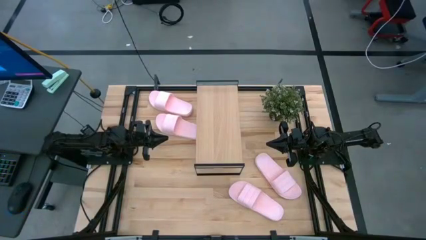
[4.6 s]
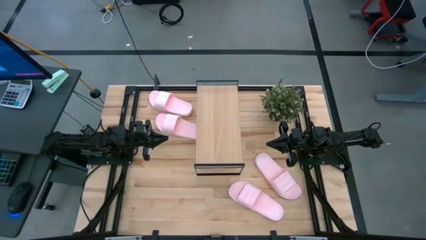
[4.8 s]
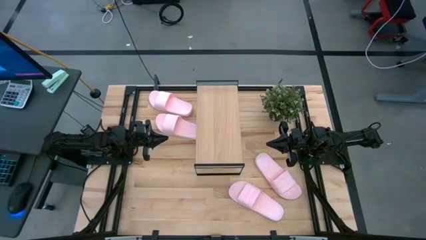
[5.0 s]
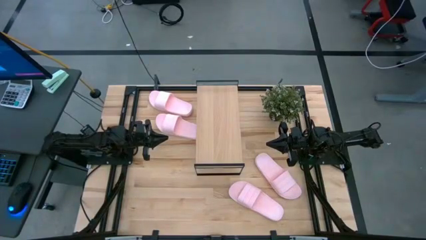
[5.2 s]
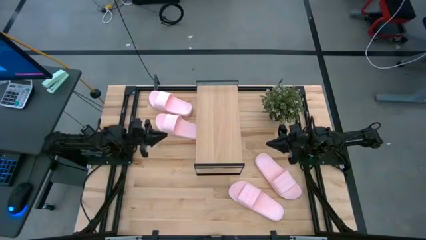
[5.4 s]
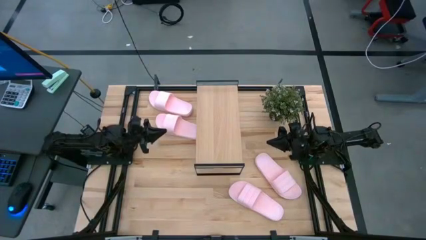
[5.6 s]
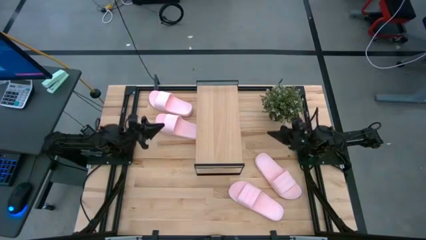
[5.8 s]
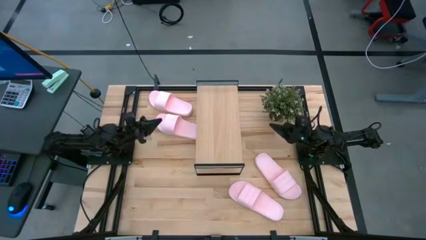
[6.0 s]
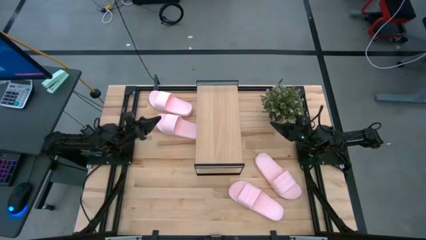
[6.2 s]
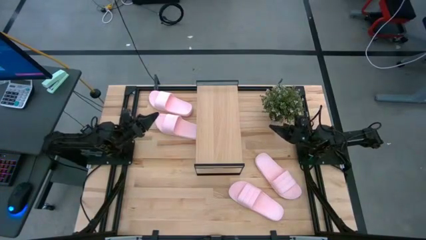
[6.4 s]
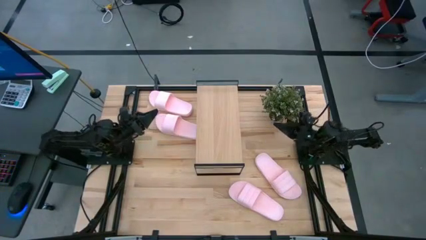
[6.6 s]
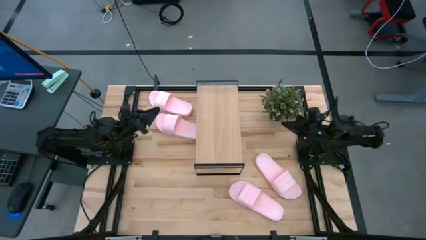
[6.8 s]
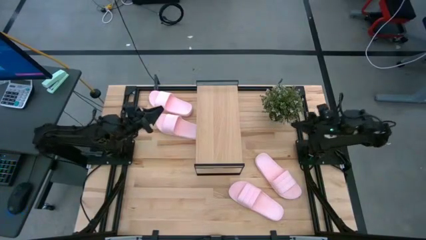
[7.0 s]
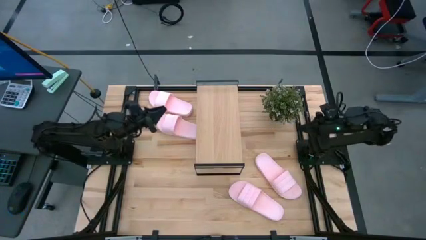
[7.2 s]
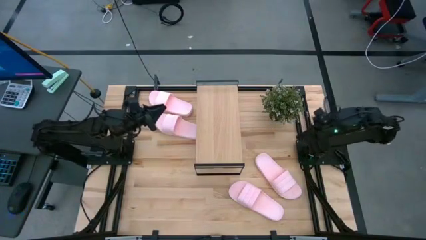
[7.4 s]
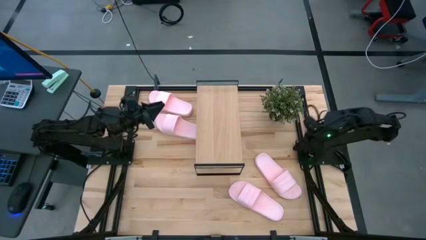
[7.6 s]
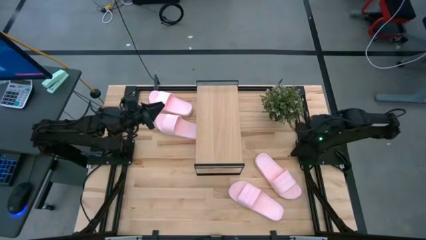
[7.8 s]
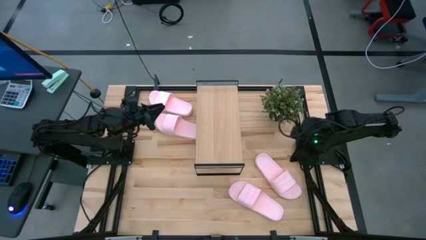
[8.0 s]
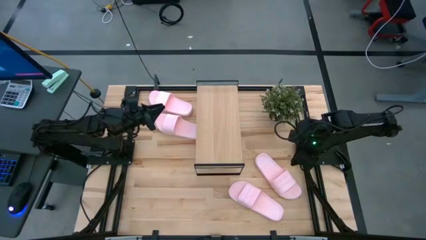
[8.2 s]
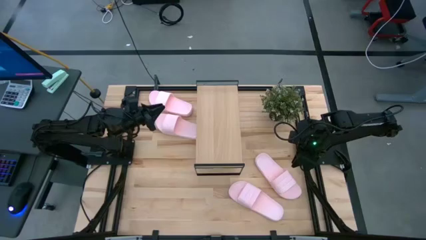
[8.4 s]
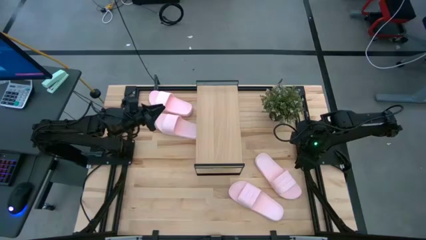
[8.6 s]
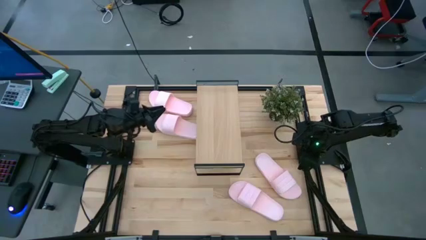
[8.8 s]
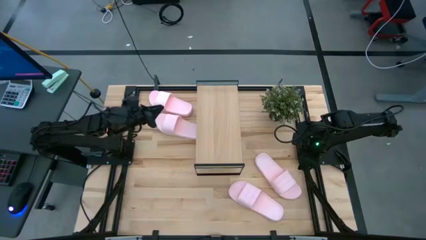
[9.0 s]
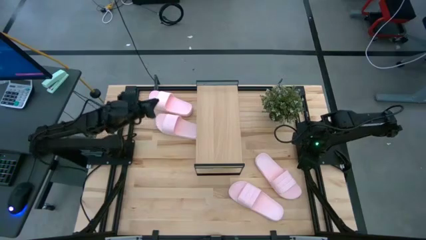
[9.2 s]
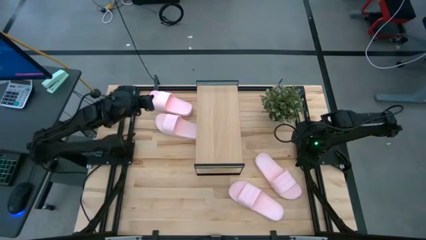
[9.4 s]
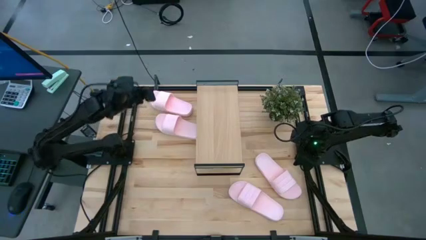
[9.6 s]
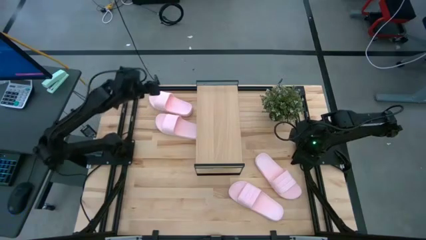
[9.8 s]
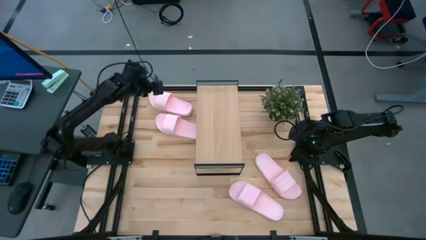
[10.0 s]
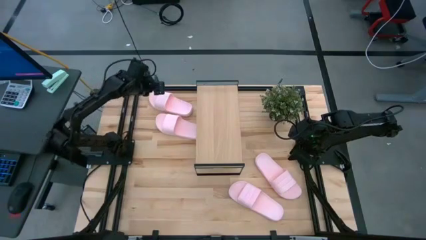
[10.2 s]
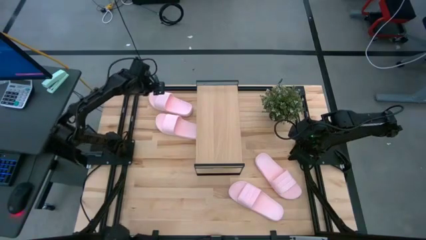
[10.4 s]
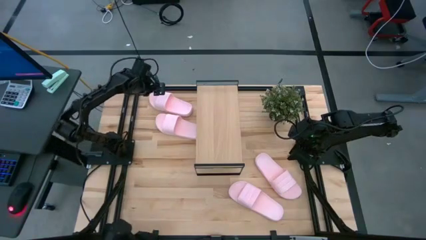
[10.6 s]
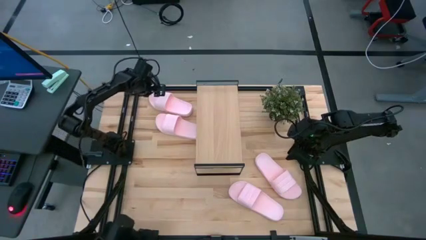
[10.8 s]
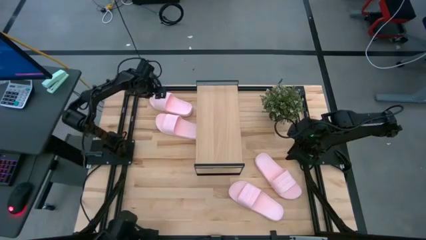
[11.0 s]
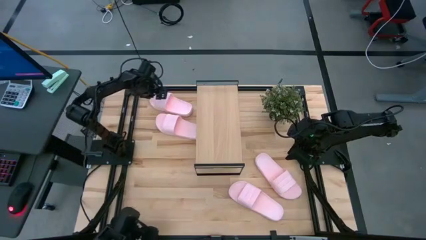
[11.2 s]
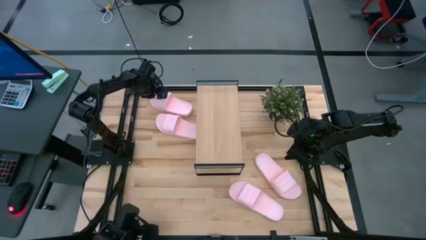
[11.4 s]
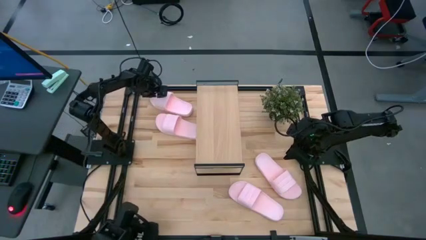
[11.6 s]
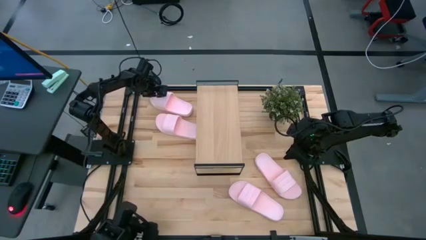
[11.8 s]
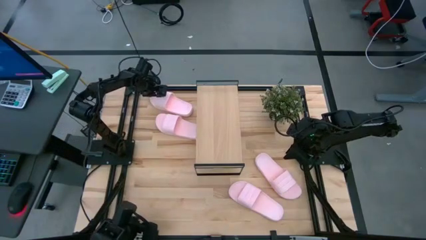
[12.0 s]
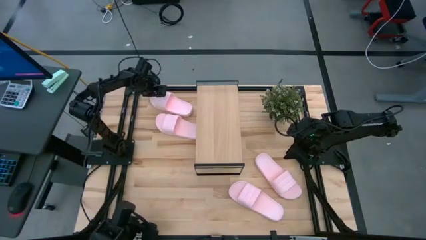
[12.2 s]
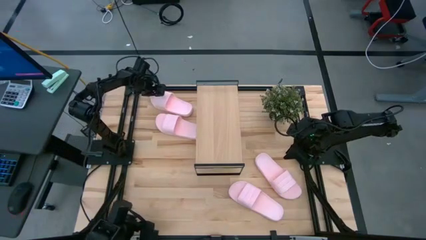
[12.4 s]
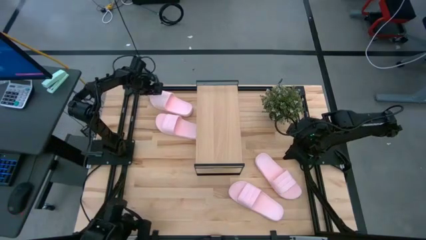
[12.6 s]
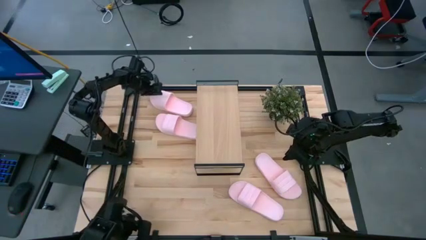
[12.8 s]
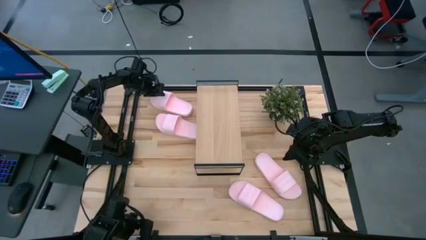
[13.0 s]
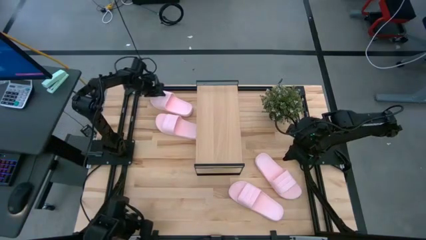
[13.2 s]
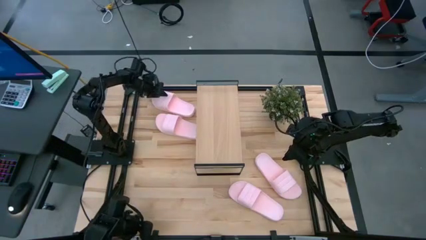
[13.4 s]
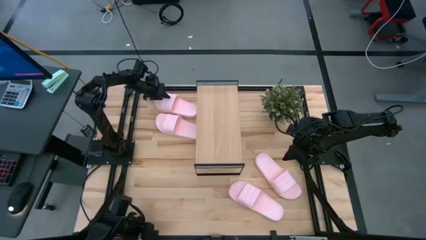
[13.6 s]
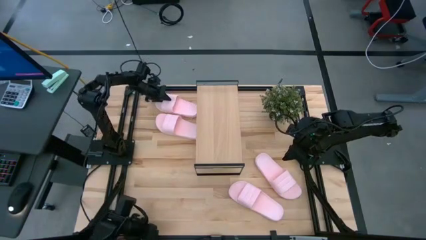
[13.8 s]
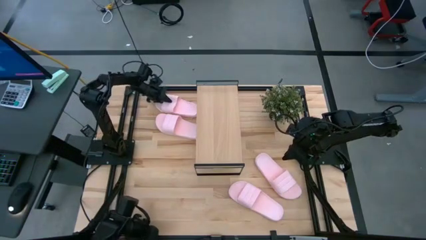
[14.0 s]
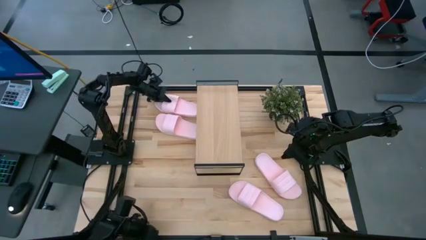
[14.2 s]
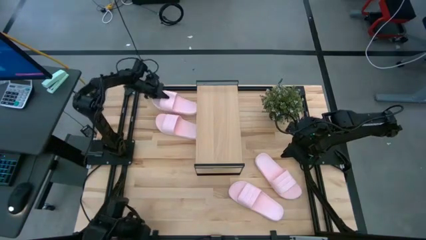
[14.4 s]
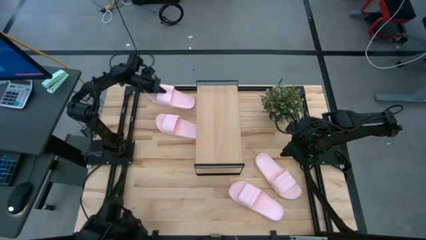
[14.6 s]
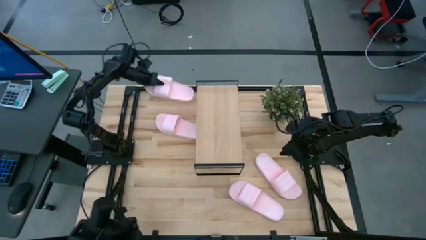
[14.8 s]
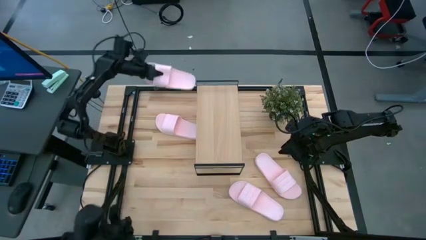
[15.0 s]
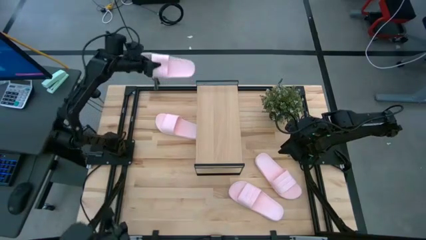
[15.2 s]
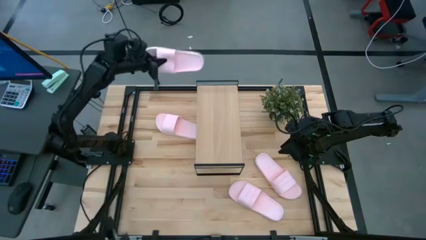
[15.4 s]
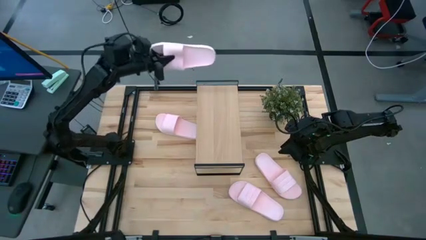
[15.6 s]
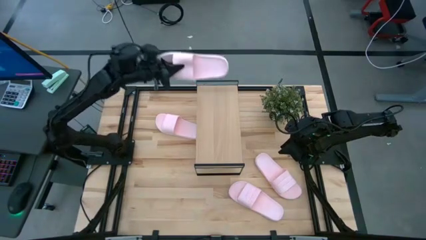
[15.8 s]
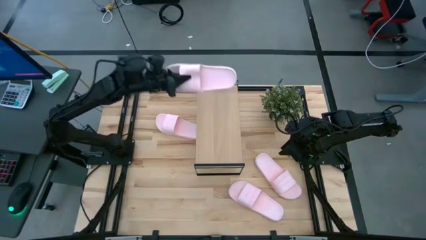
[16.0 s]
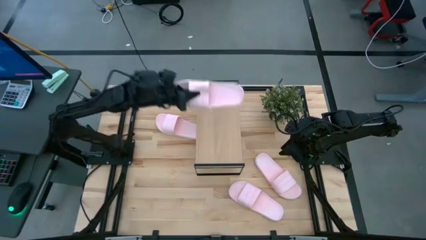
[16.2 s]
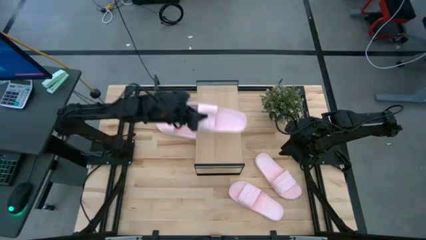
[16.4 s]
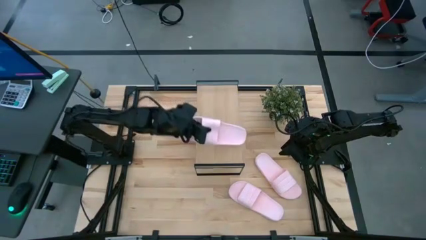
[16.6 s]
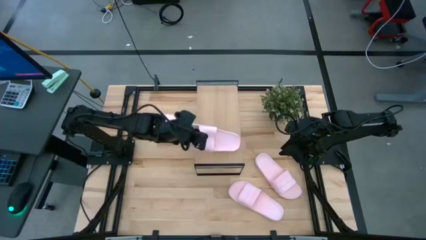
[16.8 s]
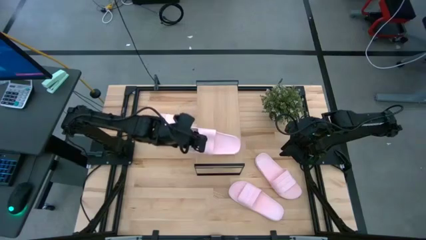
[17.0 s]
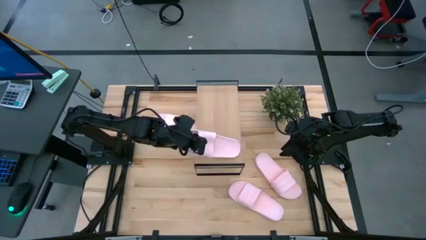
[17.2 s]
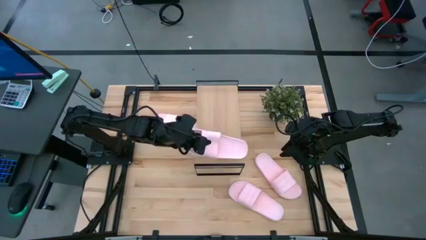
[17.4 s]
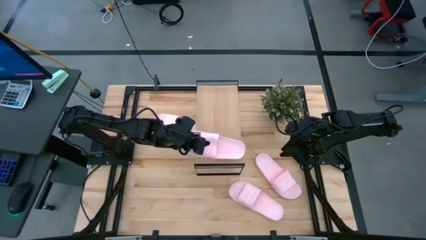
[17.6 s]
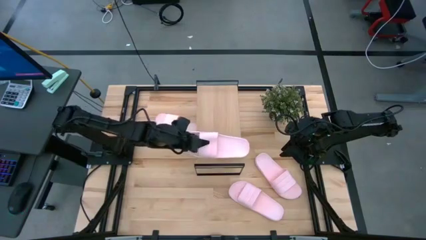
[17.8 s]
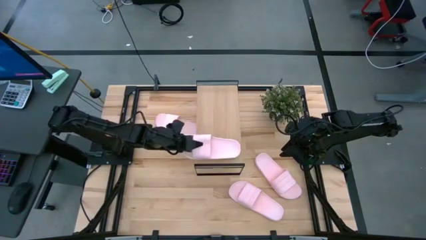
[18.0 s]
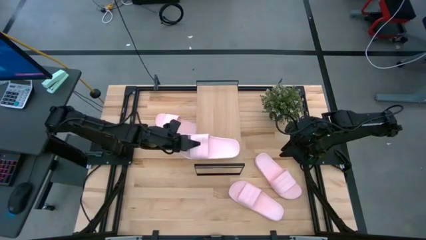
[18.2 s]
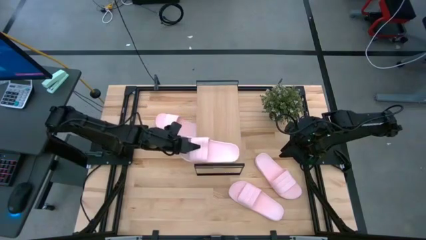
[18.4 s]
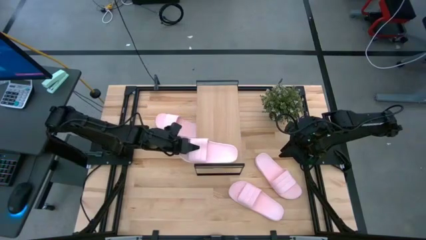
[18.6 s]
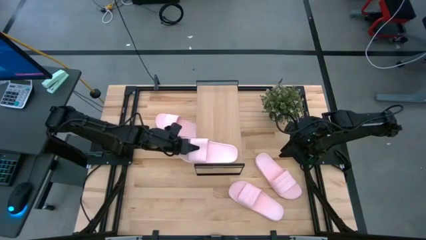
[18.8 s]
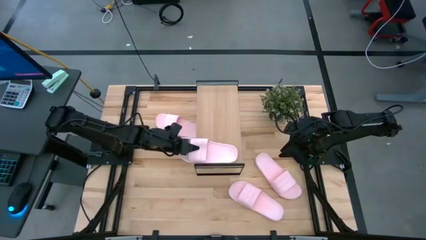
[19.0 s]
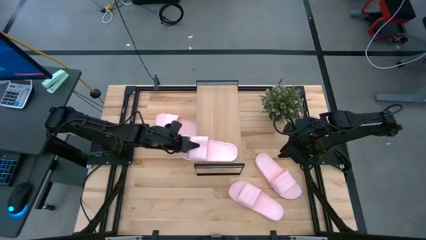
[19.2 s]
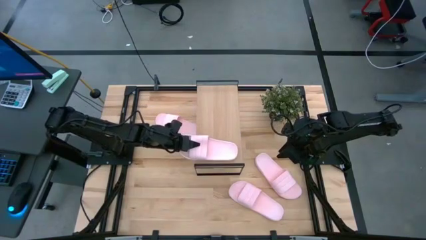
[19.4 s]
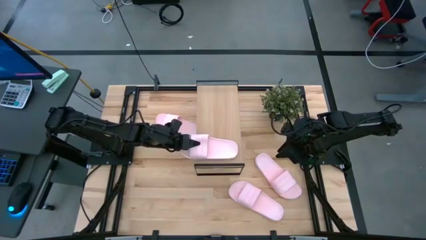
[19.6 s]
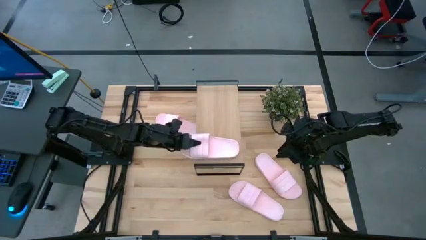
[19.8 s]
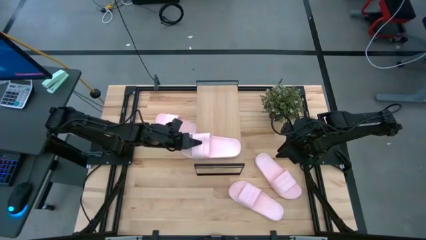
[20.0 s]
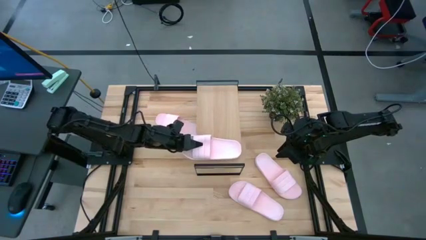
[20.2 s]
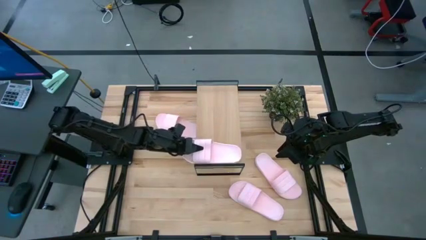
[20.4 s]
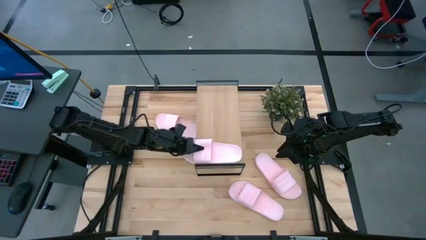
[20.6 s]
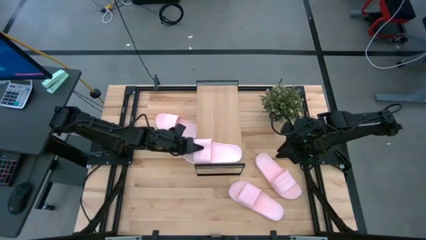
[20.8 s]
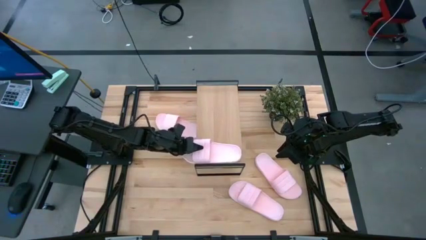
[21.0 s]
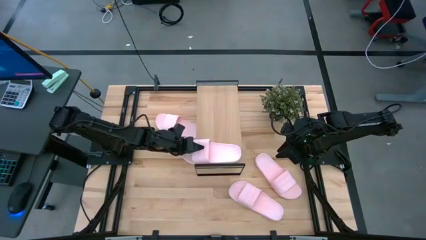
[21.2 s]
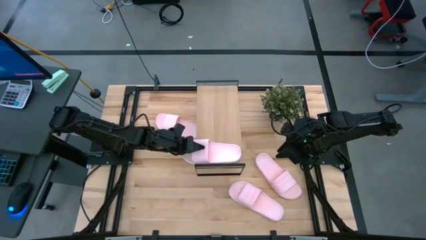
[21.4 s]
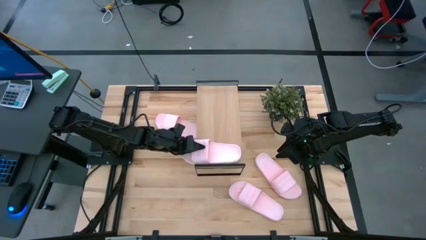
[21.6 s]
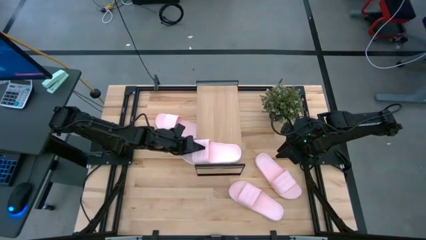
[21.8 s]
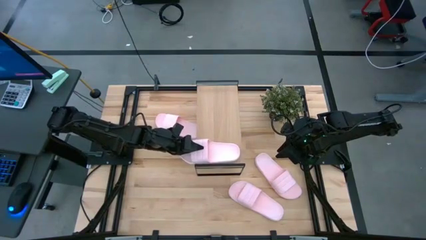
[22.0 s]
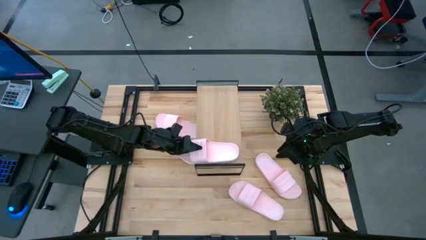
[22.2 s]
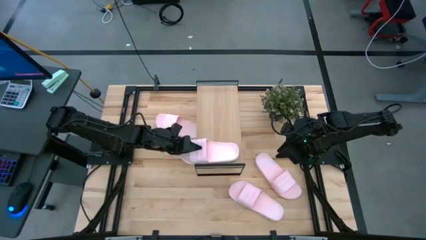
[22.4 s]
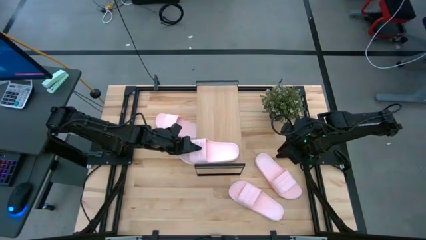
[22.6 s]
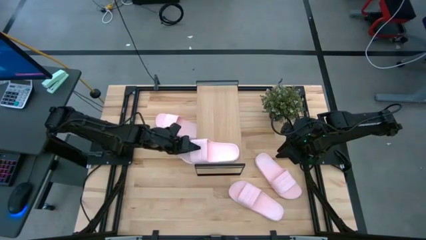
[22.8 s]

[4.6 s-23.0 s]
Task: Pick and place slides into the shelf
Put the pink slipper on the shelf
